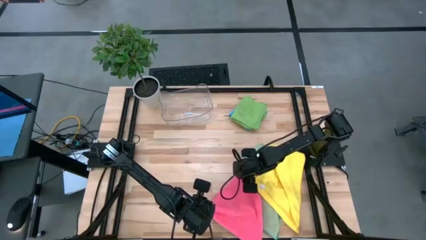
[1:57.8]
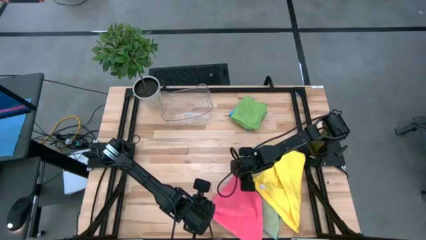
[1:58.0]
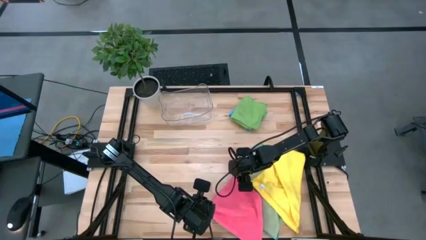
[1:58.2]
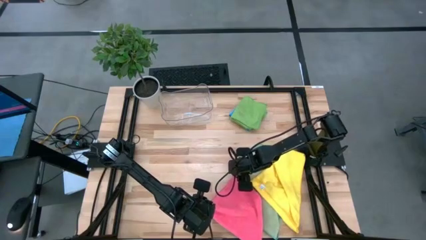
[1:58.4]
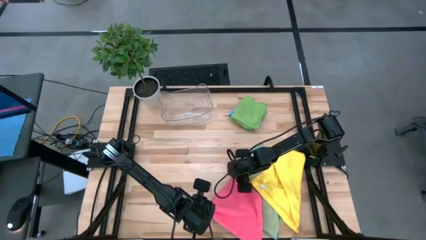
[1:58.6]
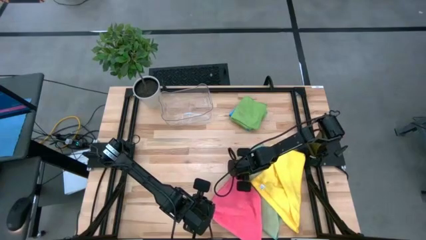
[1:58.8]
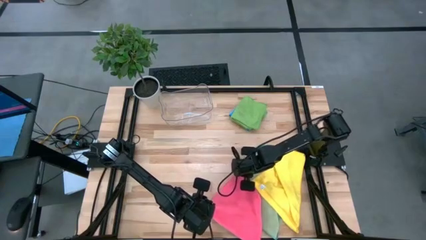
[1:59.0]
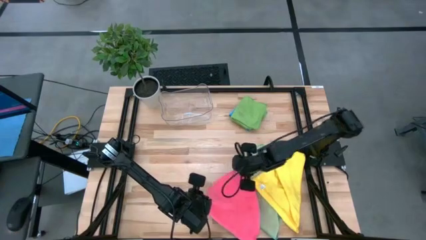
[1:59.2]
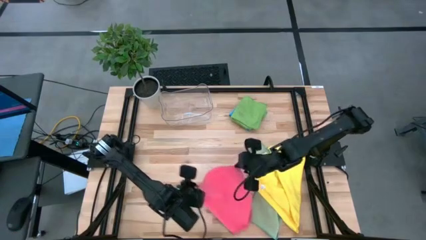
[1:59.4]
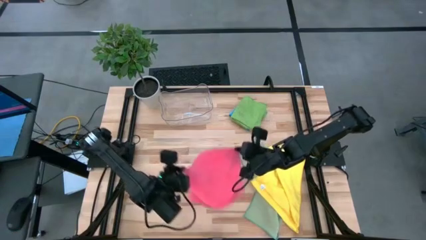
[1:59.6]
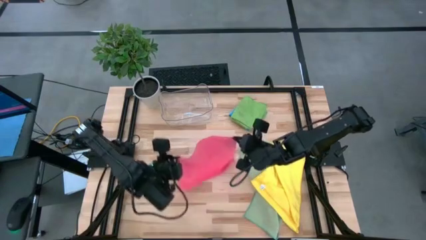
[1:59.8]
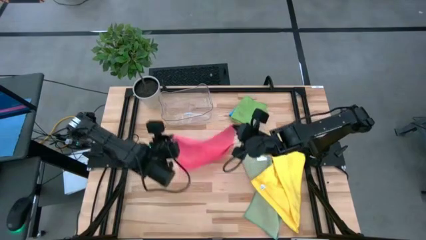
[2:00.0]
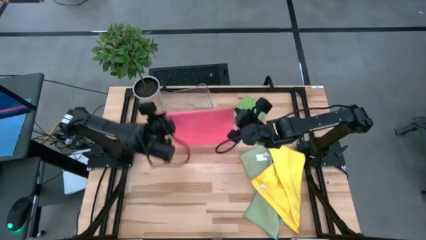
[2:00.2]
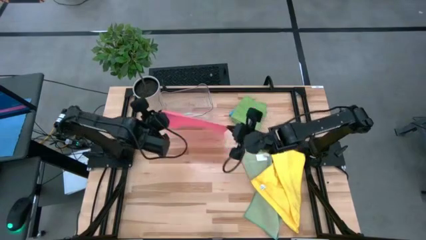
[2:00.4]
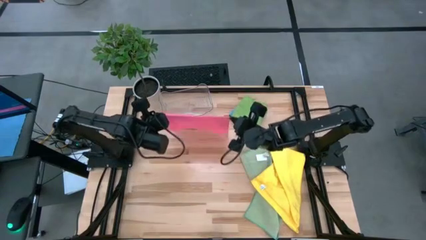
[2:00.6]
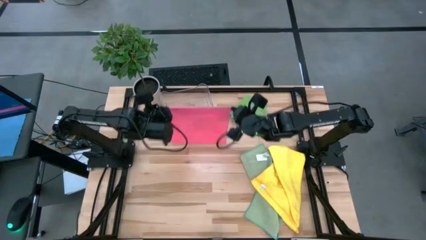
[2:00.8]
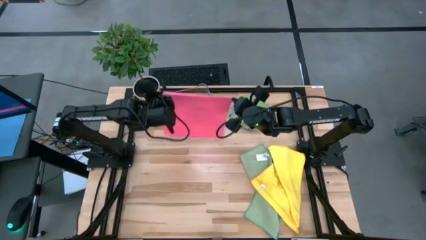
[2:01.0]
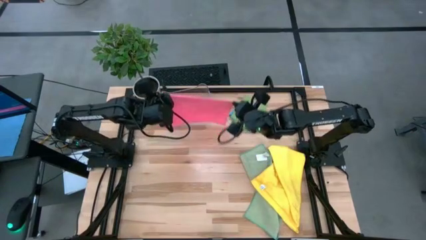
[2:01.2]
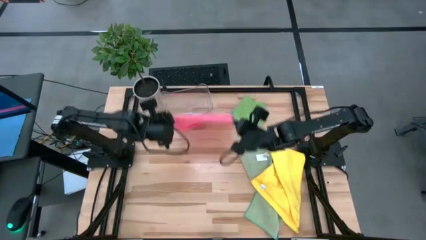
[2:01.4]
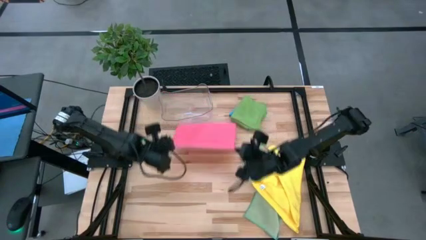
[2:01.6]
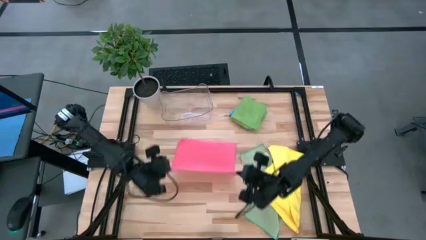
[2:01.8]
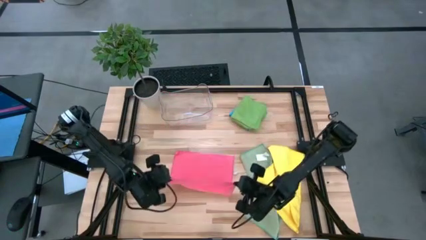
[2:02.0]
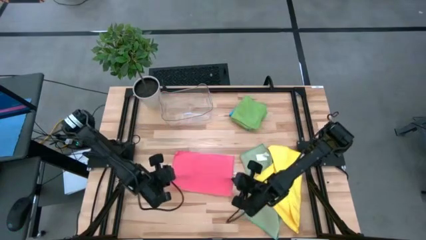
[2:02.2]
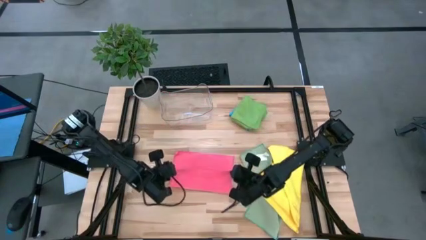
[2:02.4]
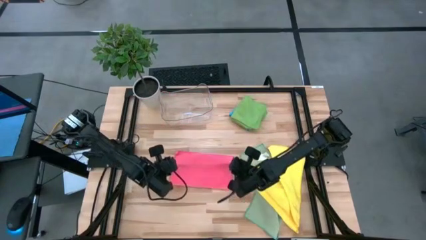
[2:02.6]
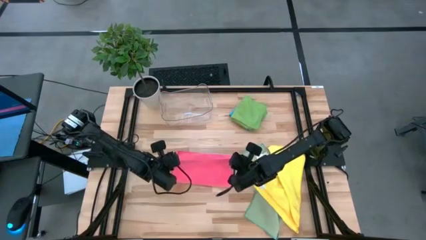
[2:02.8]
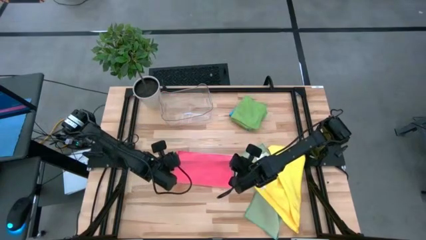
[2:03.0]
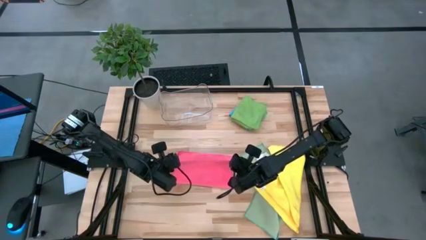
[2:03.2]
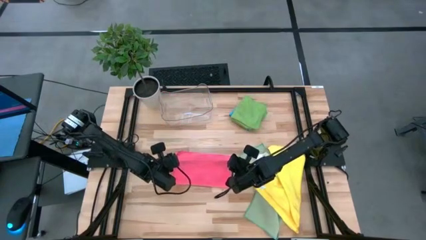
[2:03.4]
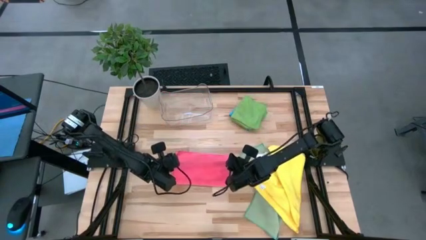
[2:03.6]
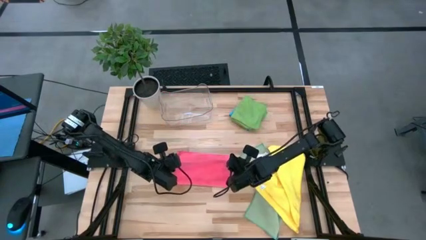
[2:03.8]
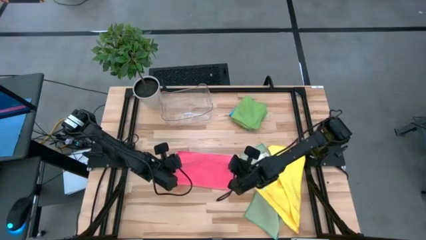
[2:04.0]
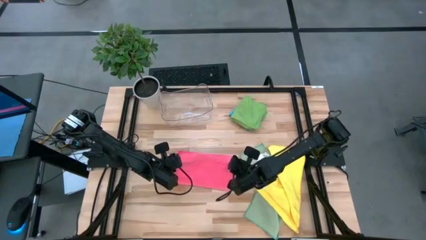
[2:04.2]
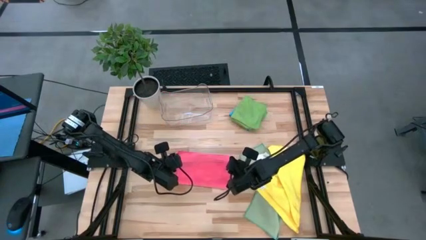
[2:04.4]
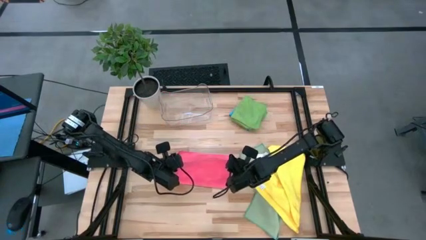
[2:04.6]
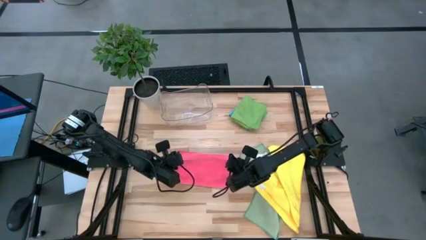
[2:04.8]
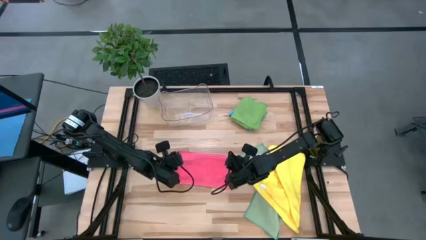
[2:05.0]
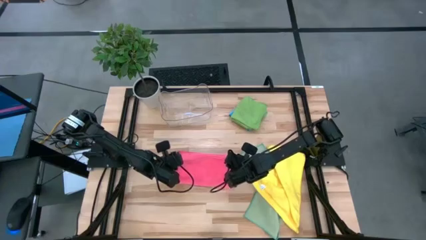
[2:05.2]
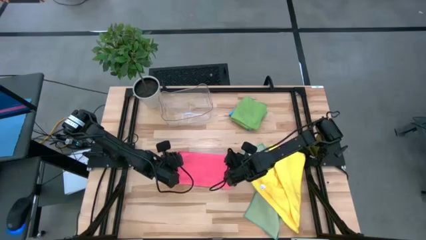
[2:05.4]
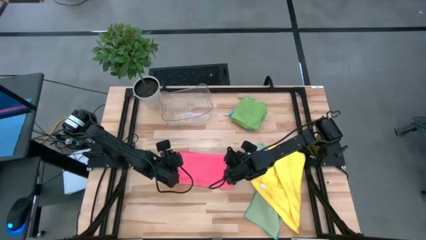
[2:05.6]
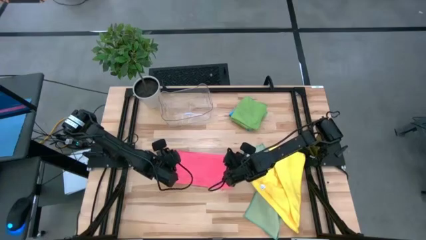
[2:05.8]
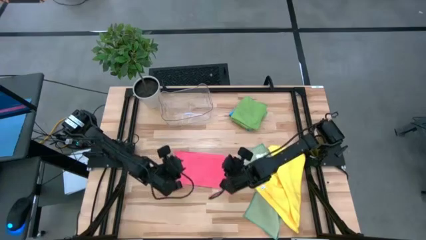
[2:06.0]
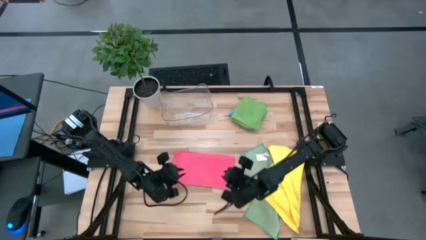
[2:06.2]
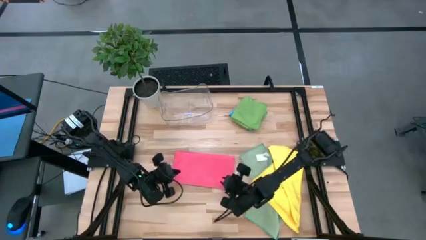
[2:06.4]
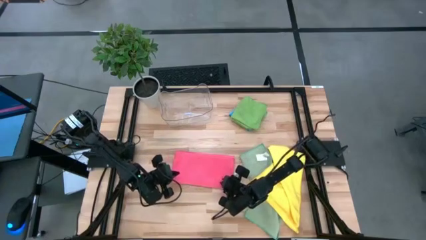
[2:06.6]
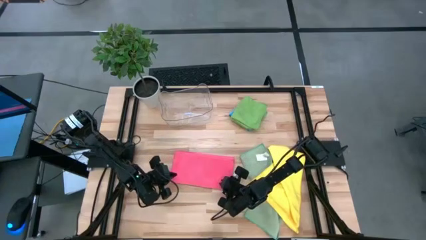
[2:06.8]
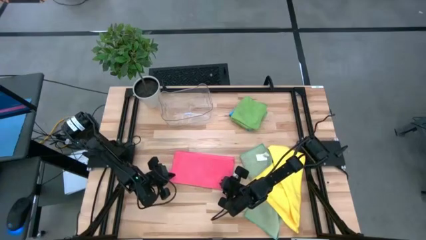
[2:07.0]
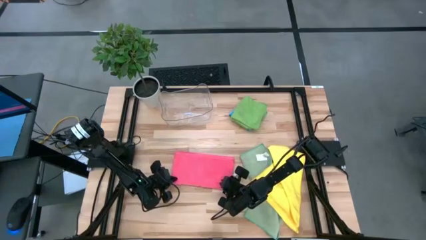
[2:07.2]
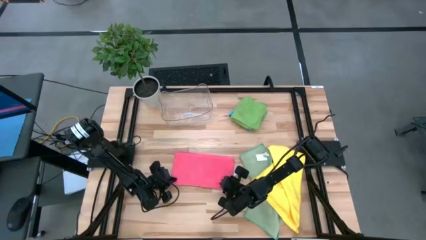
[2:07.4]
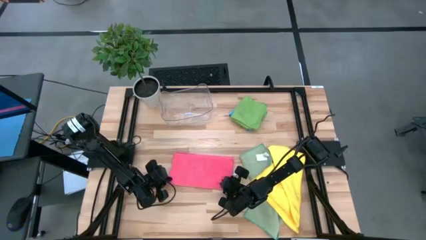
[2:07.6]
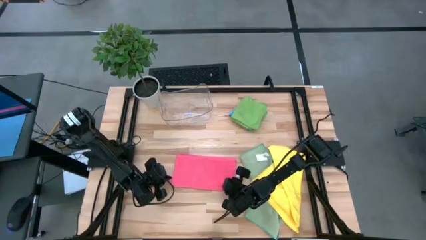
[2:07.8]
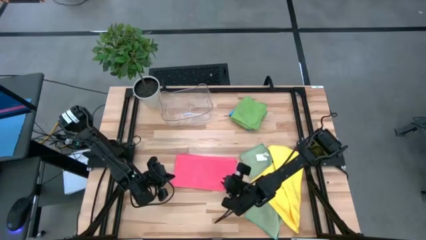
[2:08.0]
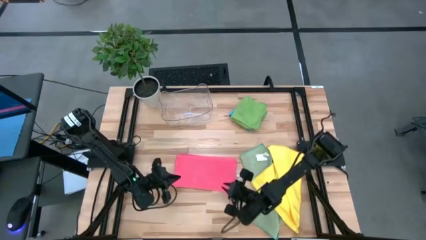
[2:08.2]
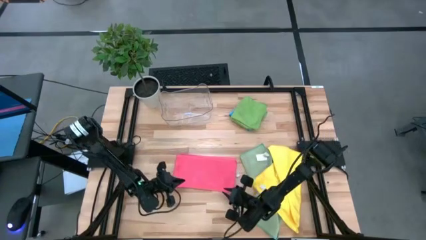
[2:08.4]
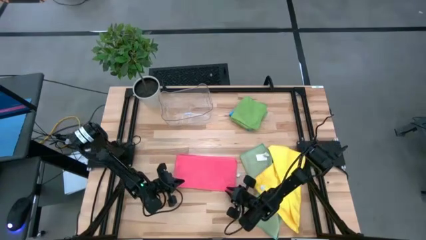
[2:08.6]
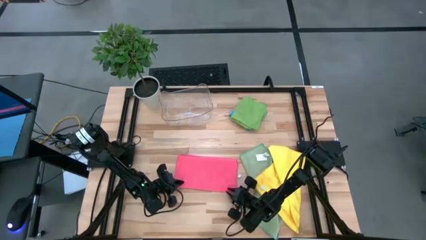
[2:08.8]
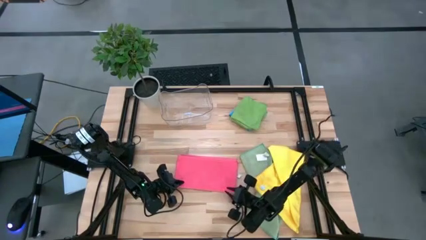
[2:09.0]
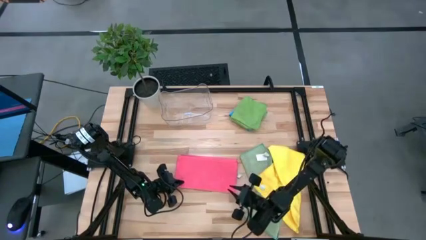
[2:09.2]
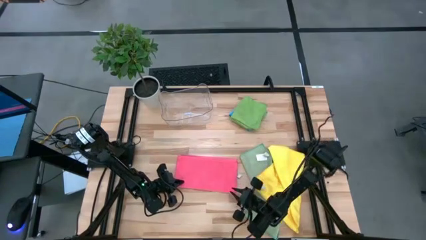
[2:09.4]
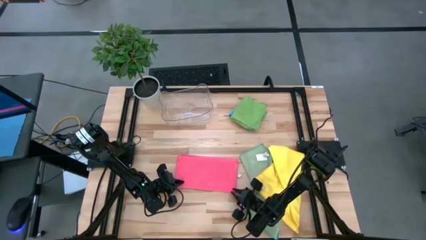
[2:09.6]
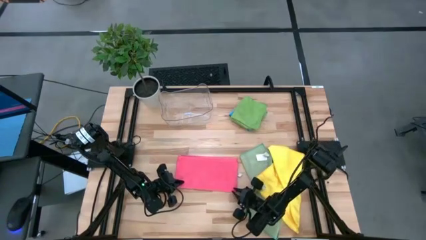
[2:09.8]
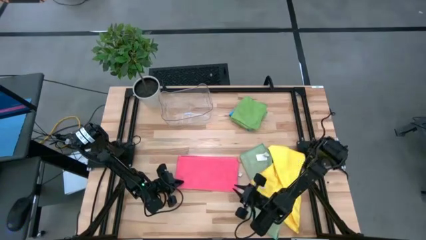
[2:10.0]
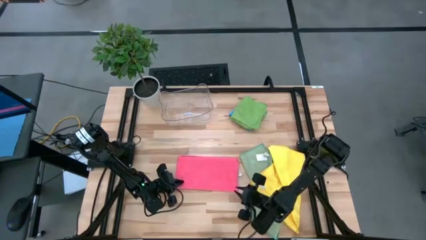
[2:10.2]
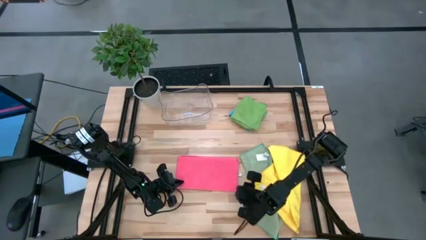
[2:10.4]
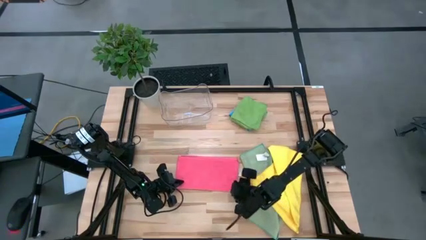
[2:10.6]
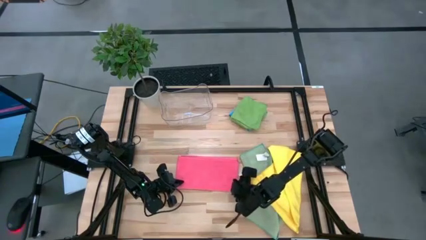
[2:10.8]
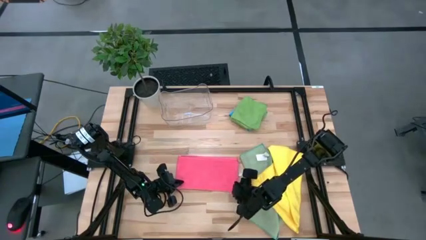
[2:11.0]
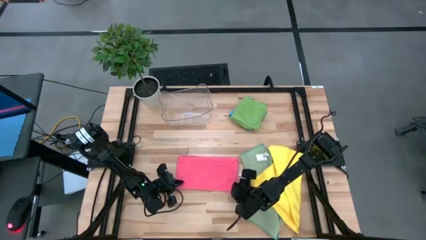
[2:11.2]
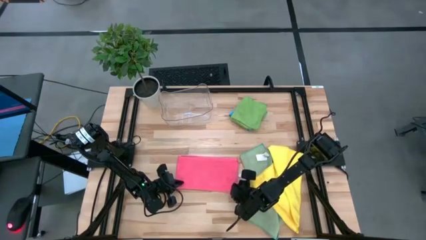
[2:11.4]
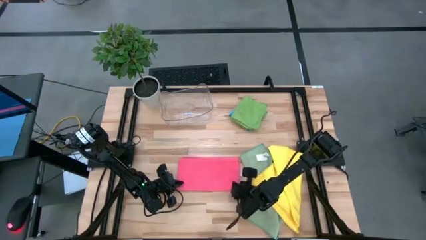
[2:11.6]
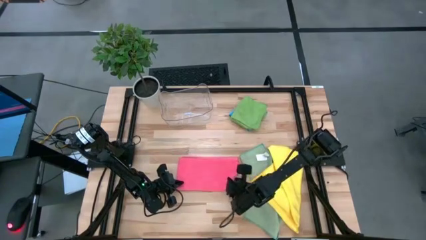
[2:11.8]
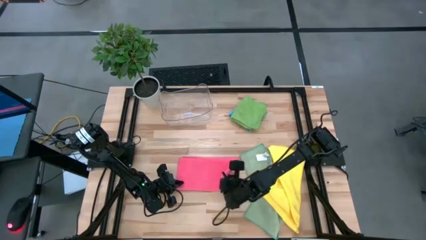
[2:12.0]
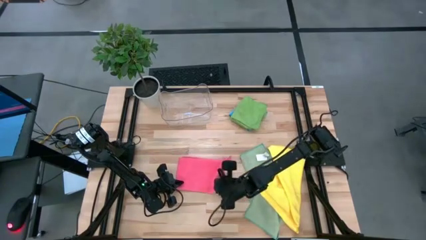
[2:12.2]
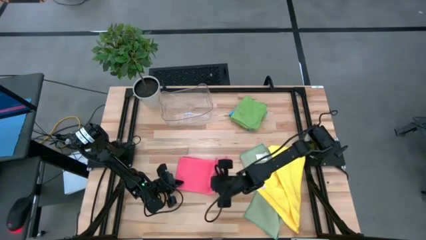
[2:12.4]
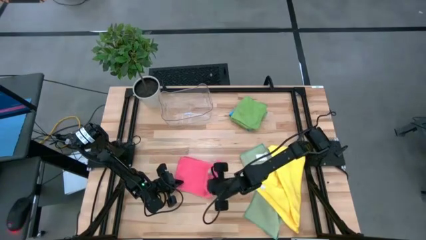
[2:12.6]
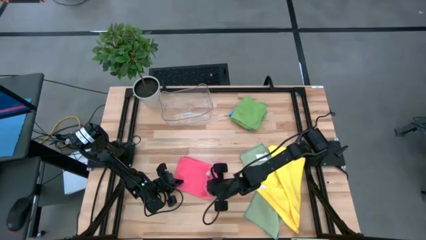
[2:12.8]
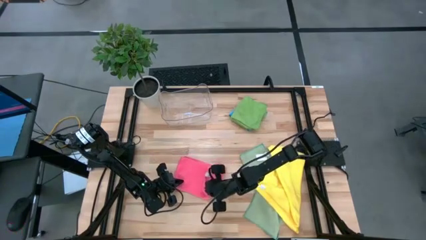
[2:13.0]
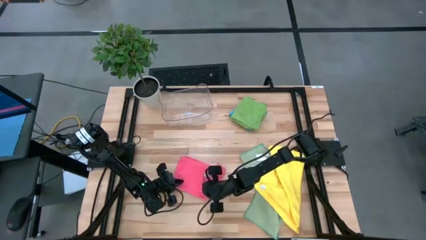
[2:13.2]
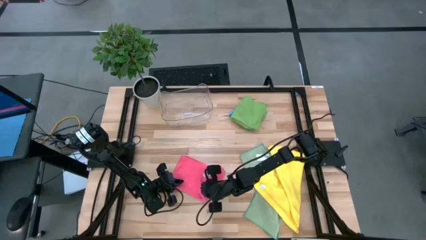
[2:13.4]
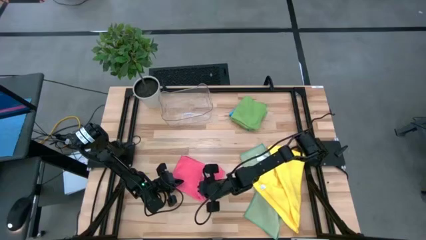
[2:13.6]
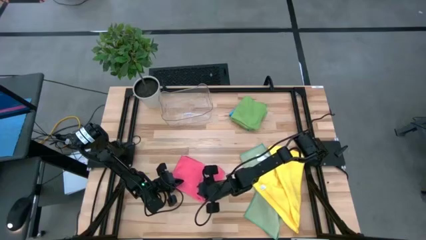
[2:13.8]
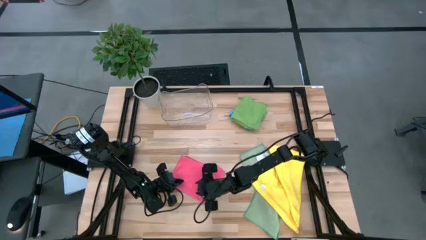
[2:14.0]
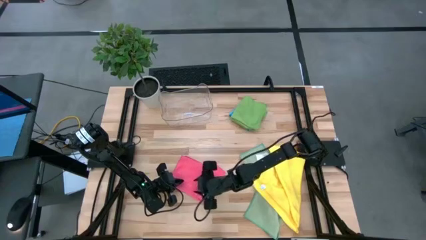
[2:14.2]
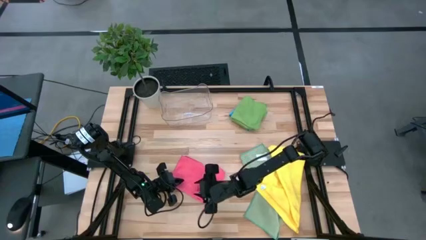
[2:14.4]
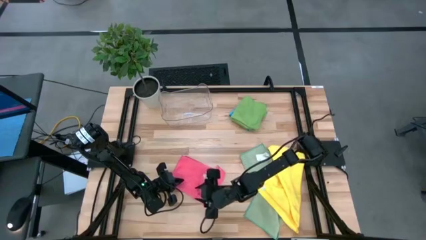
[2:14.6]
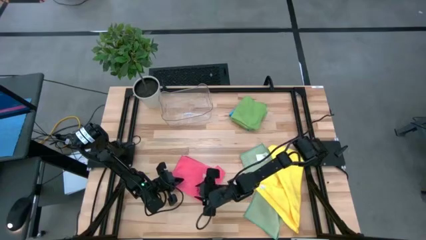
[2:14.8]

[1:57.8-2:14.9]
Task: Fold microfiber towels
Fold the pink microfiber cloth
